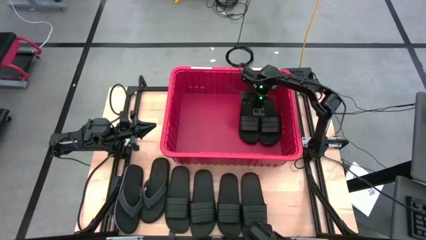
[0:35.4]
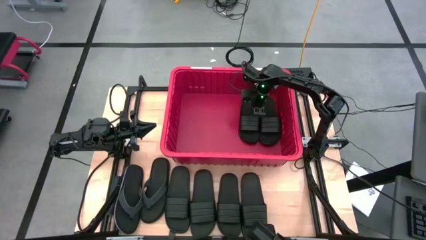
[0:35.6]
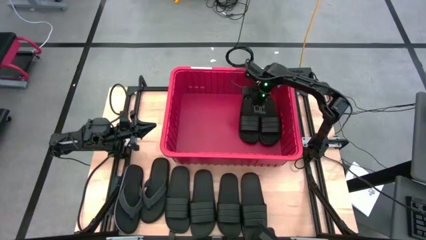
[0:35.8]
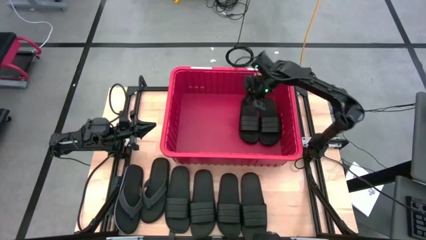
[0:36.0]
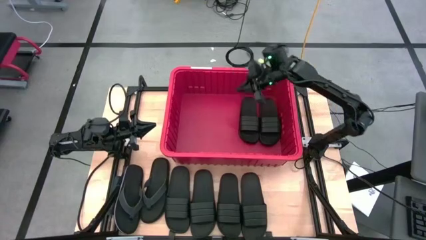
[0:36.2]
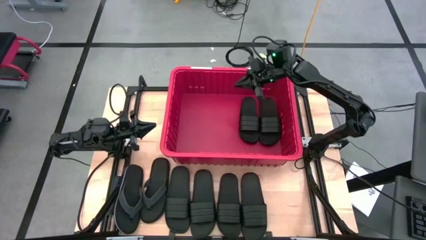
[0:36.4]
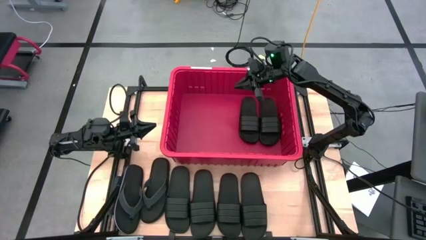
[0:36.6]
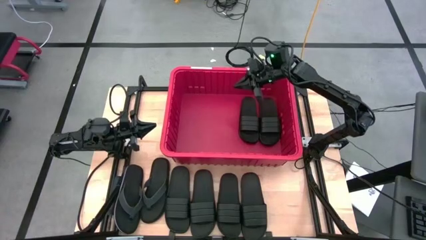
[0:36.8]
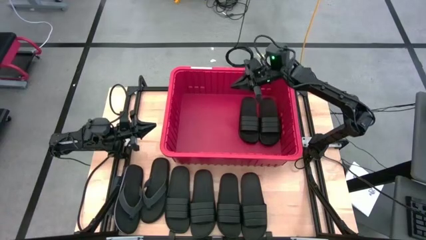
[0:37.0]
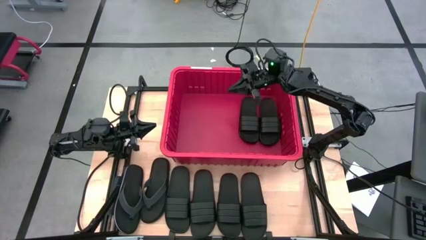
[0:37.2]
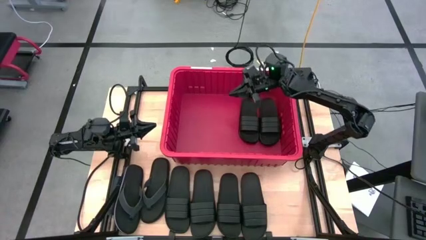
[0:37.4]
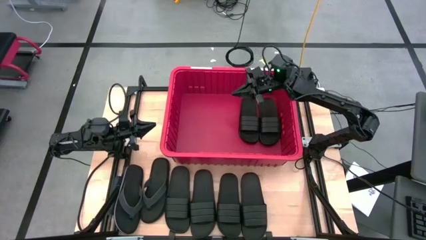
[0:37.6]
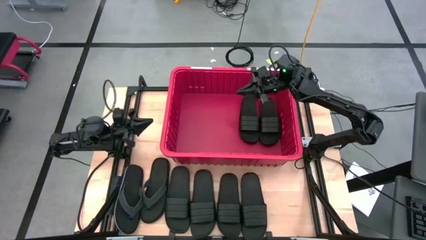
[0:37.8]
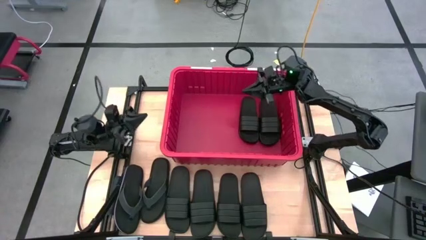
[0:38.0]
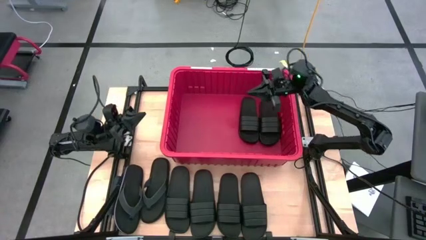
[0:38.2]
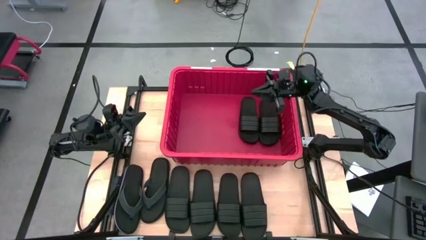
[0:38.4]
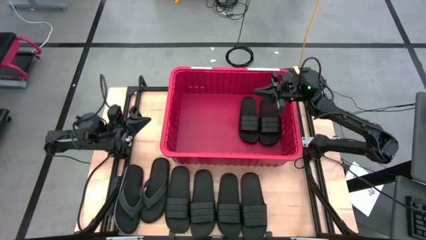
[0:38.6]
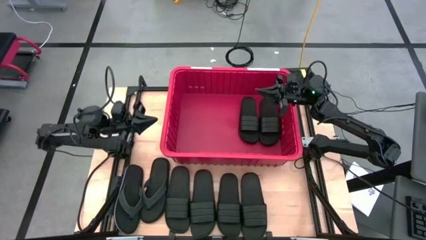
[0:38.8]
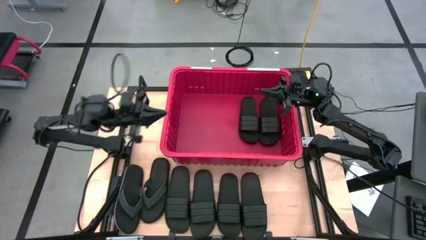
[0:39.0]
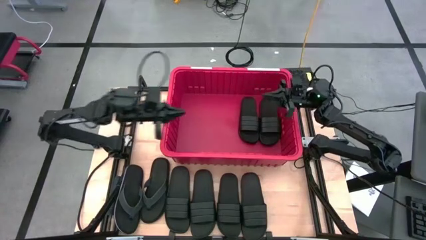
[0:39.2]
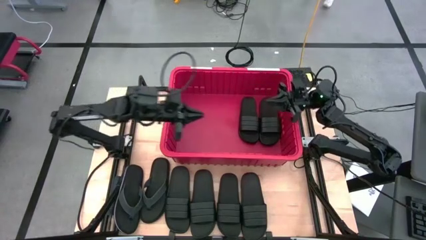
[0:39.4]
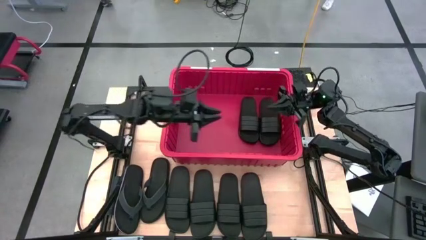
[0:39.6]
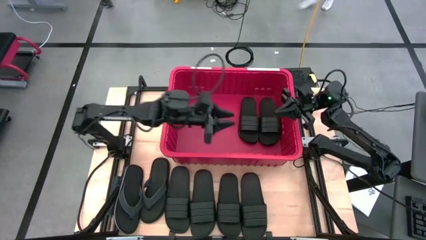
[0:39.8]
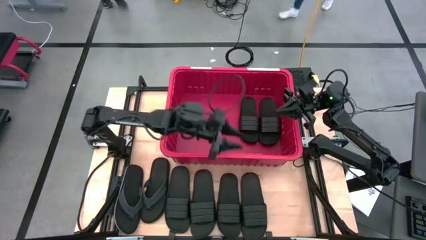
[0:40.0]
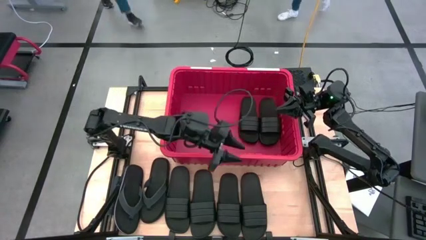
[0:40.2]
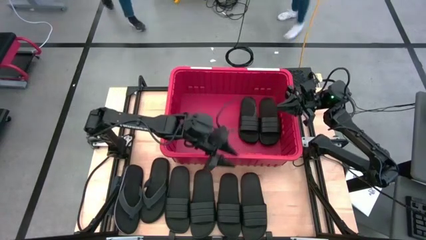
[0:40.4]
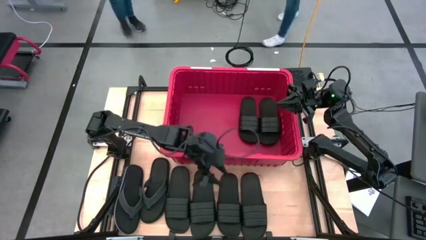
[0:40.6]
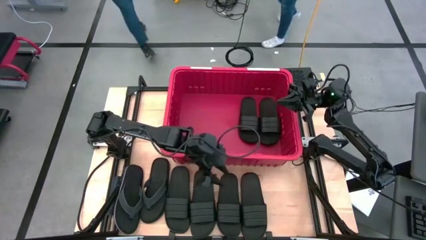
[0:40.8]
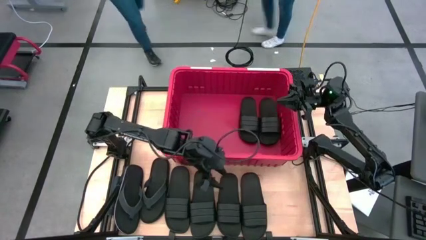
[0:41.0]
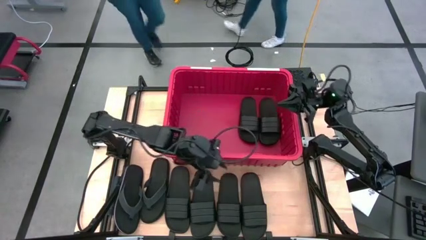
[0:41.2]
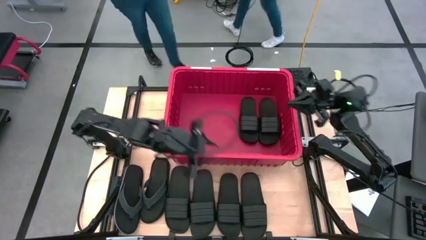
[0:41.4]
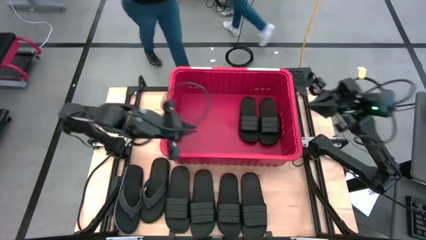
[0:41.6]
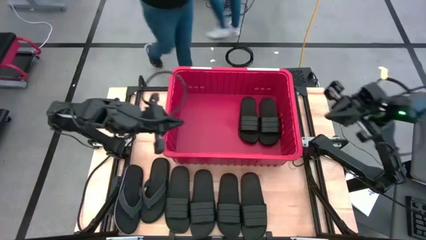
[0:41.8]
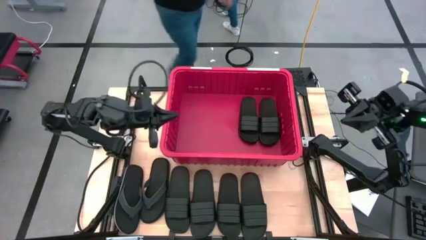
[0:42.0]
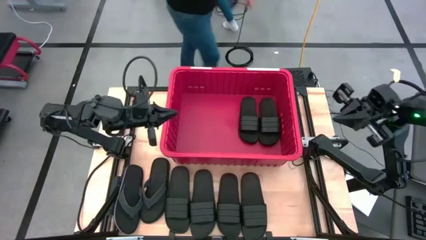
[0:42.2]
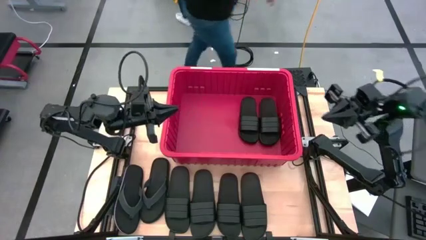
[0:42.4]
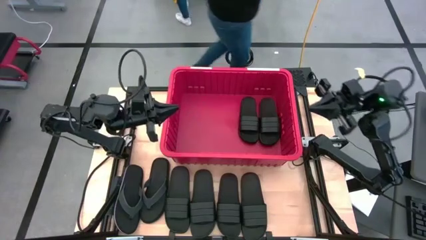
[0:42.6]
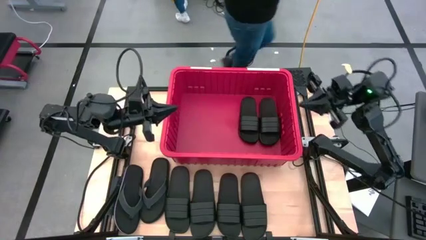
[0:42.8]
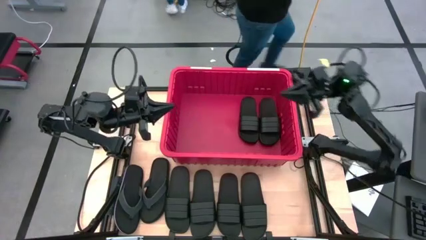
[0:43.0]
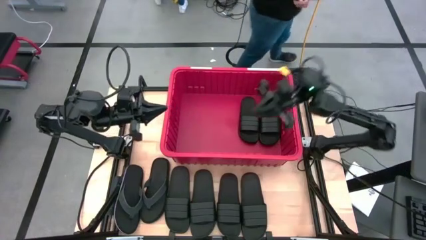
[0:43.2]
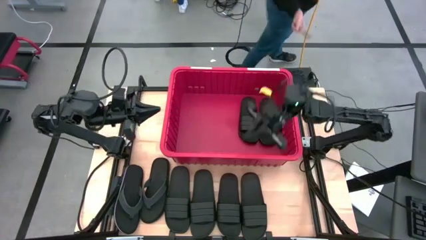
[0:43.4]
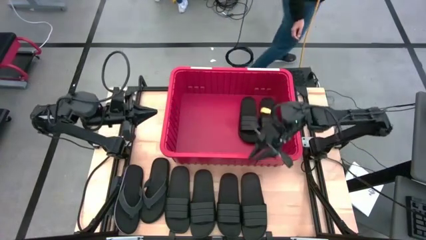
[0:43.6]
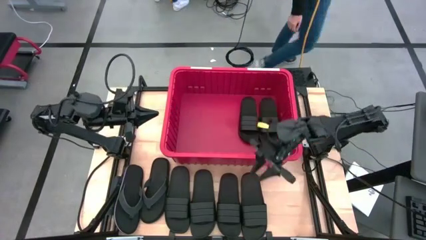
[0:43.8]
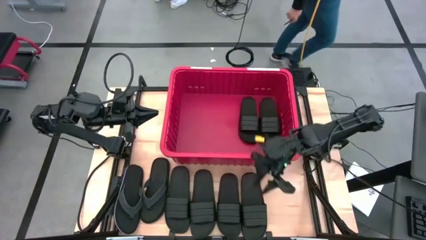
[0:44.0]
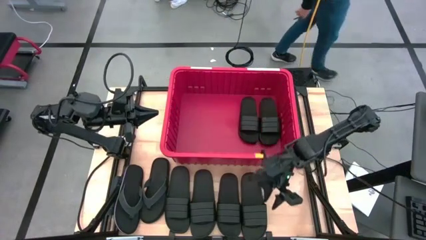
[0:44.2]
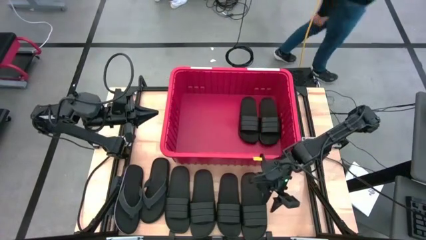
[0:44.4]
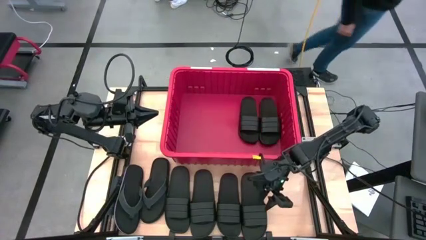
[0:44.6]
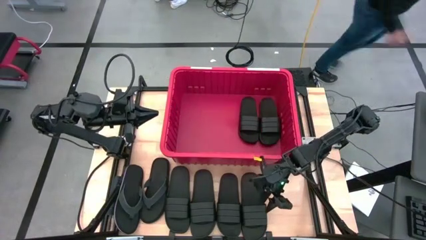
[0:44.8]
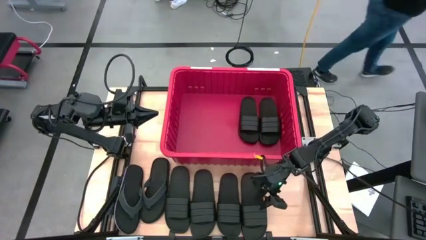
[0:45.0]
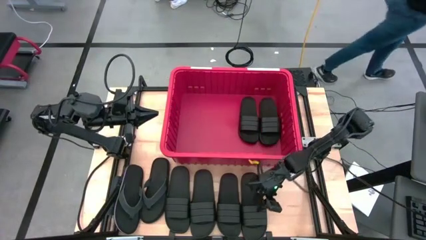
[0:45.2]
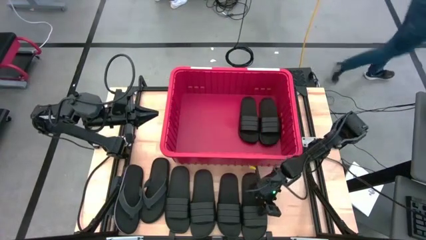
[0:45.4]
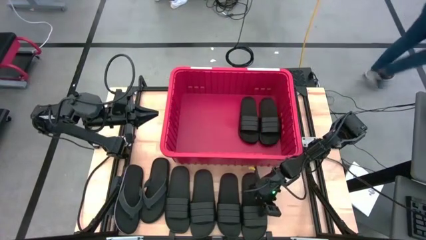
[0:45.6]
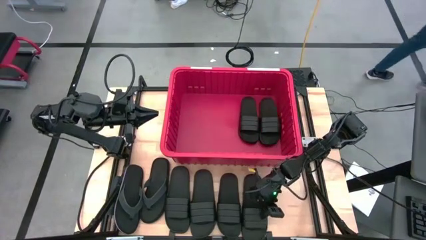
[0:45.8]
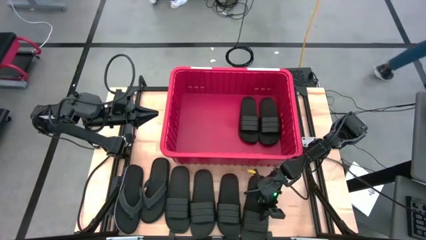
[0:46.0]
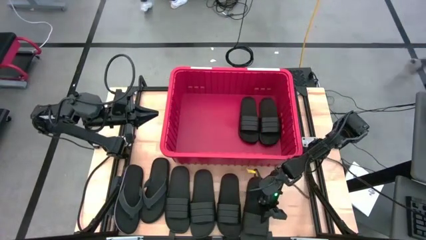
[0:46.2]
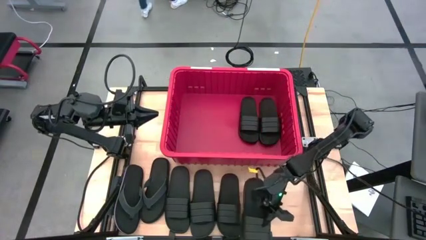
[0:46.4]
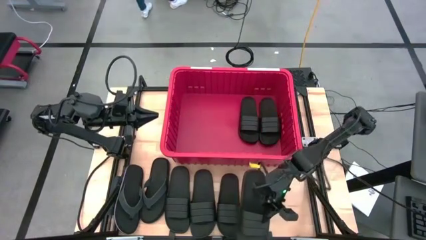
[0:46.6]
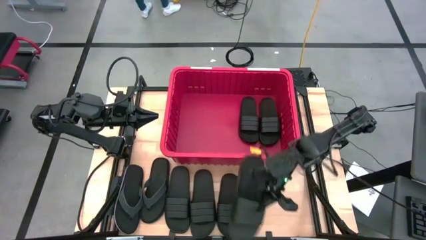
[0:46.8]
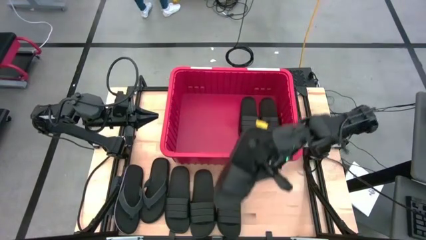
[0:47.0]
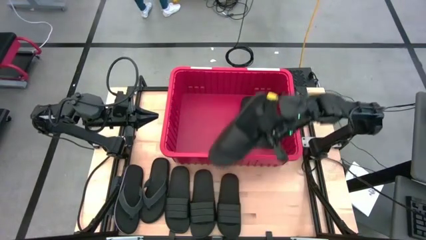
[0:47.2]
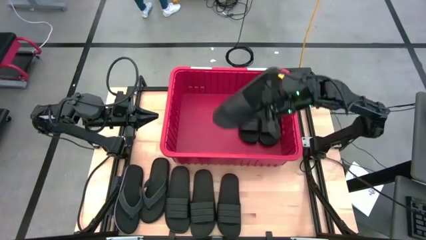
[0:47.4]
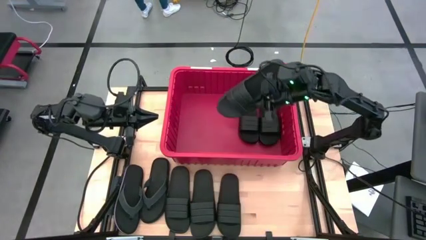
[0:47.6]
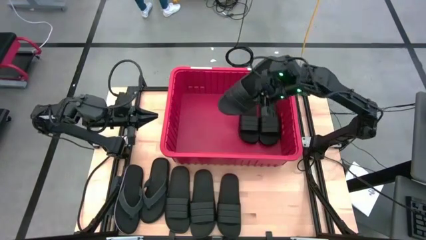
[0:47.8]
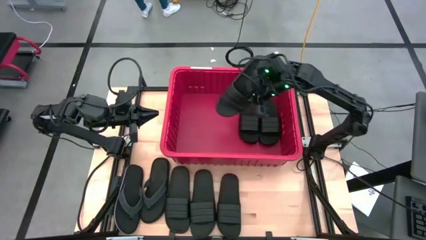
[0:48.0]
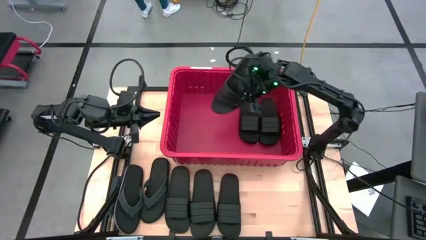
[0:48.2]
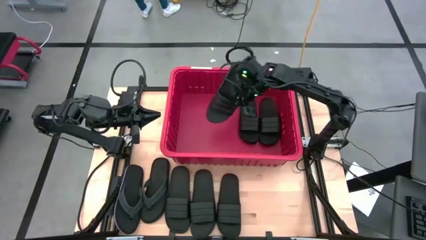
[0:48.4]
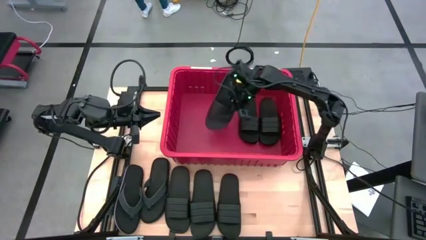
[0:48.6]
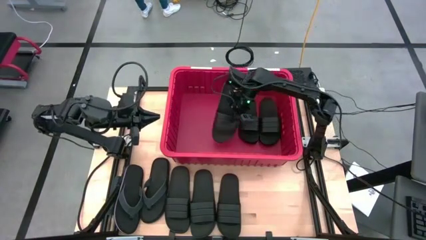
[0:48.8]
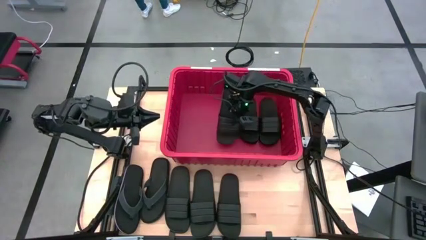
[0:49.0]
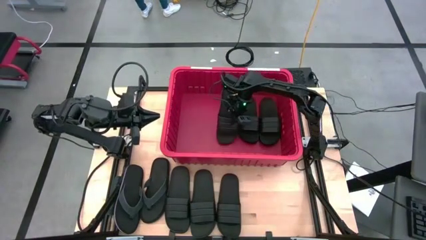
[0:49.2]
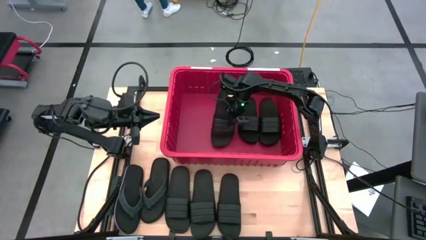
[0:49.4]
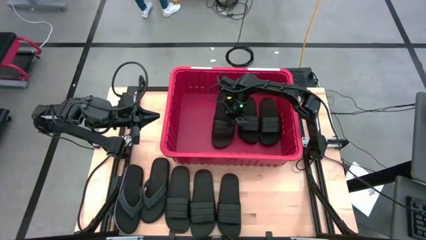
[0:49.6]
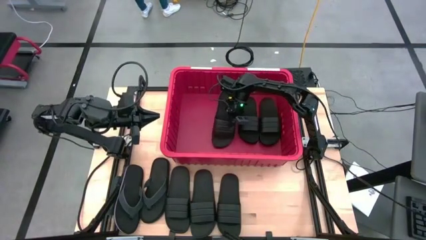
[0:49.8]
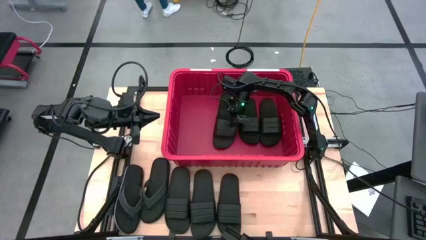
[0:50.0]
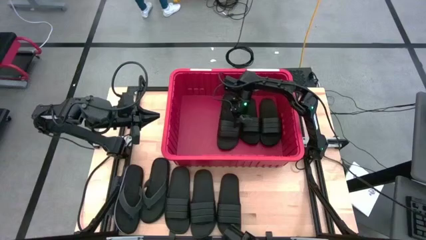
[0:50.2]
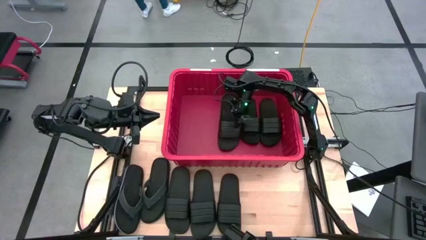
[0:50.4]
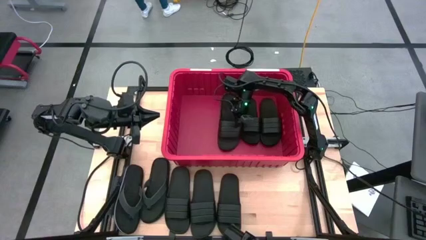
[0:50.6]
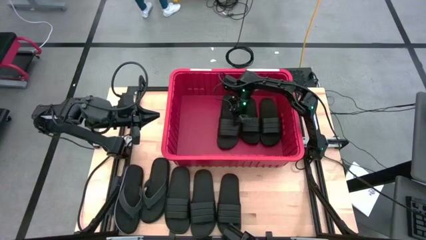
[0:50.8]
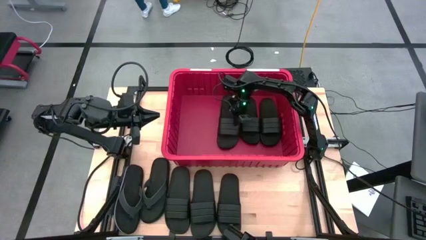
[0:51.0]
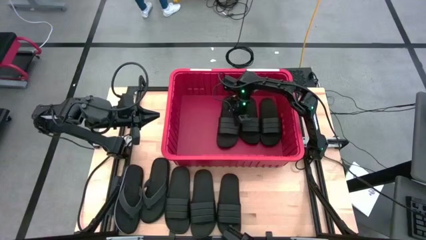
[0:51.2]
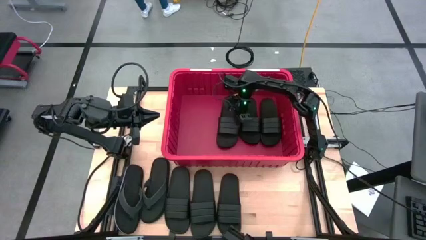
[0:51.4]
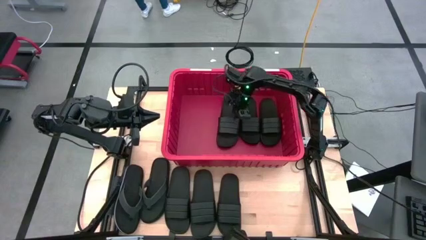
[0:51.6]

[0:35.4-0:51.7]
Task: Pick and place slides into bin
Put the black slide into the red container
